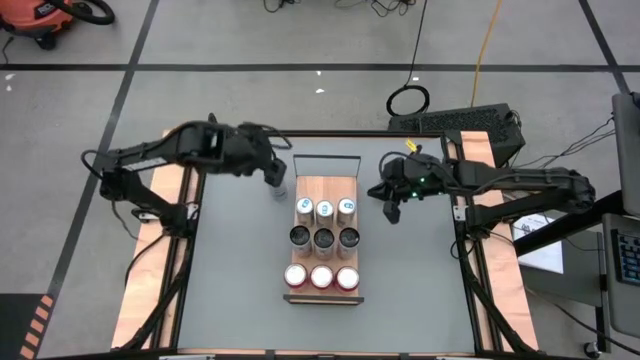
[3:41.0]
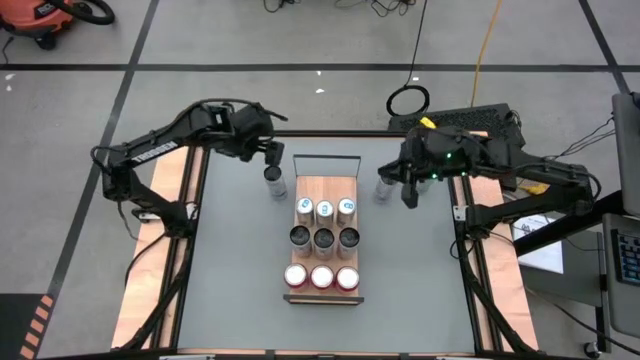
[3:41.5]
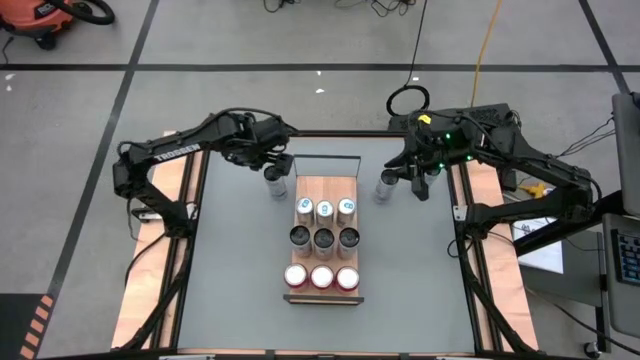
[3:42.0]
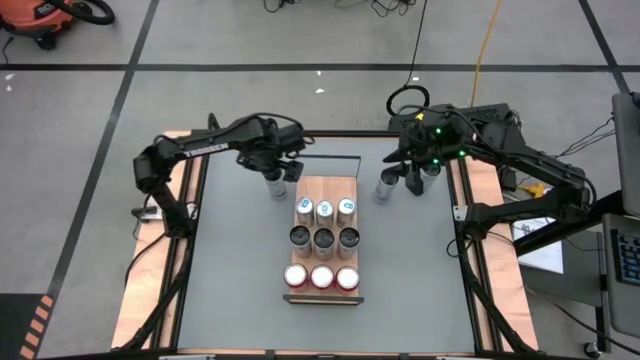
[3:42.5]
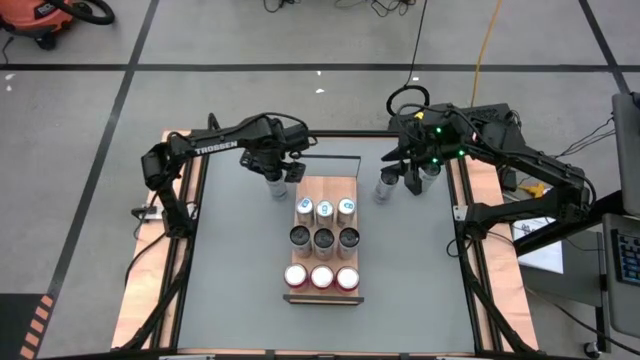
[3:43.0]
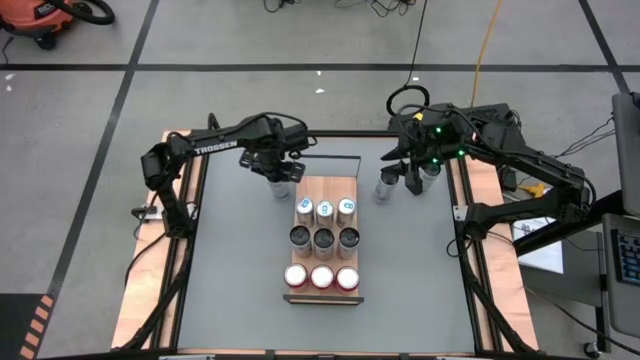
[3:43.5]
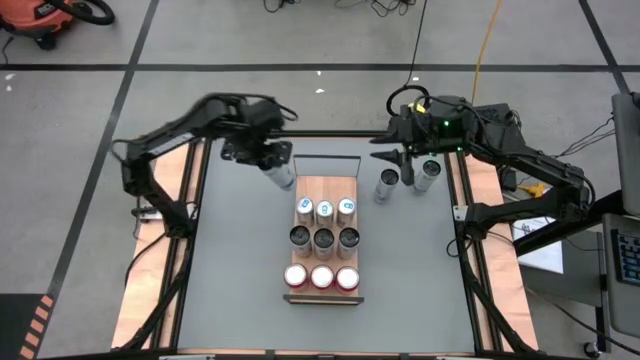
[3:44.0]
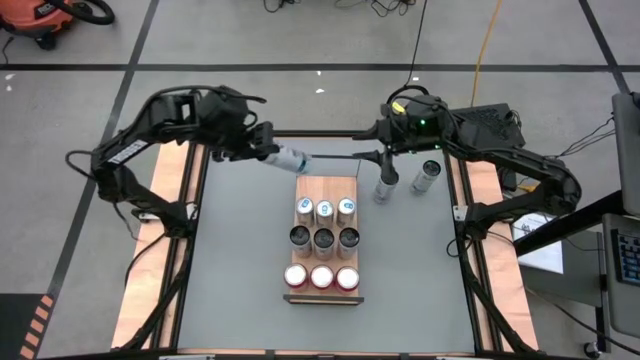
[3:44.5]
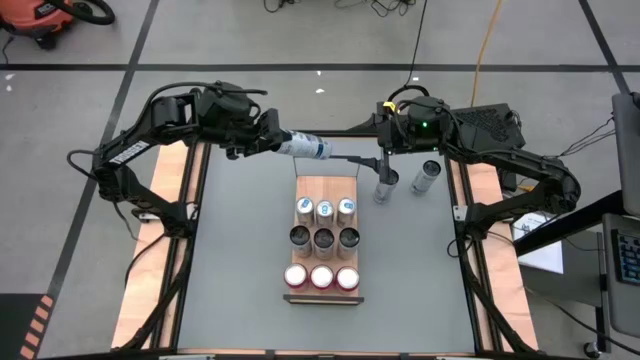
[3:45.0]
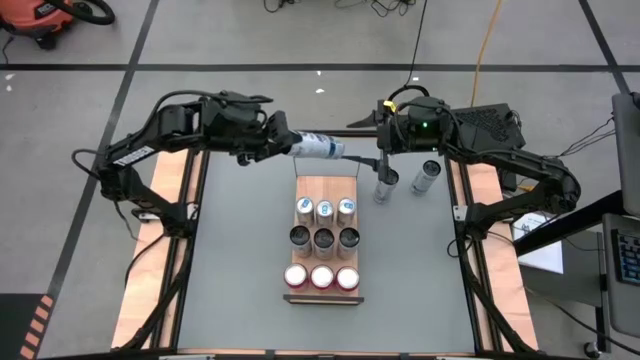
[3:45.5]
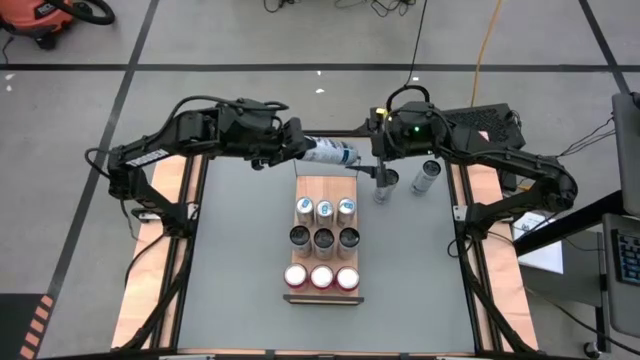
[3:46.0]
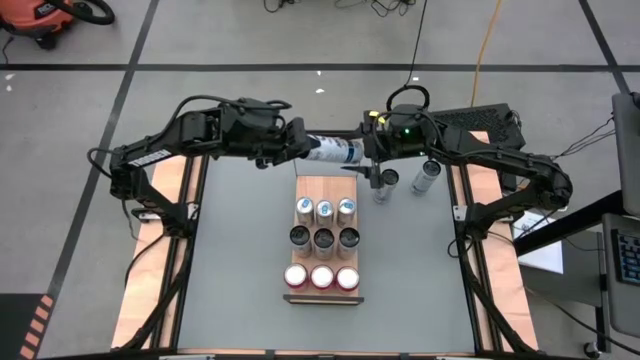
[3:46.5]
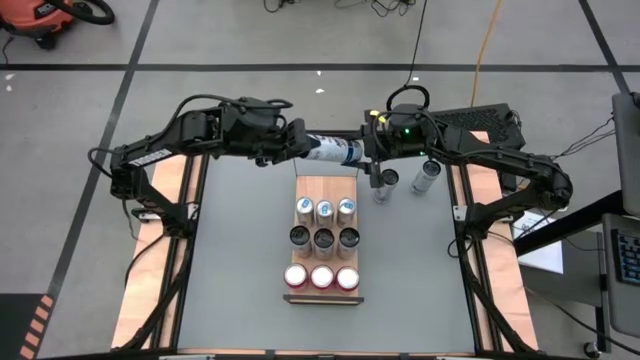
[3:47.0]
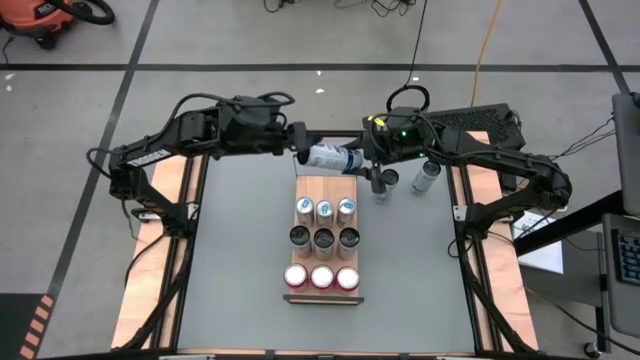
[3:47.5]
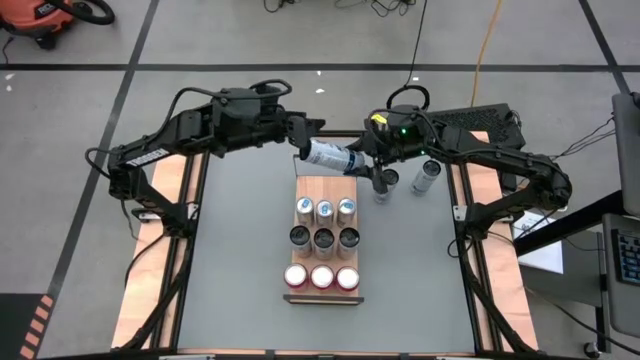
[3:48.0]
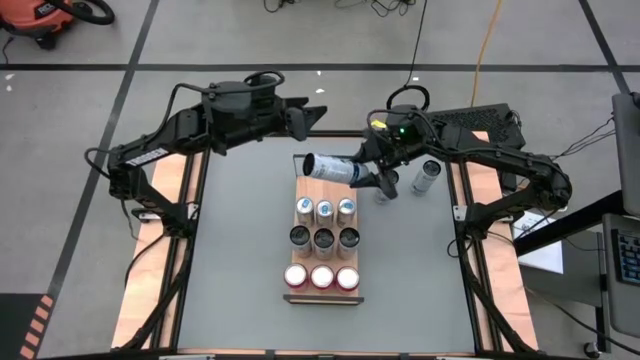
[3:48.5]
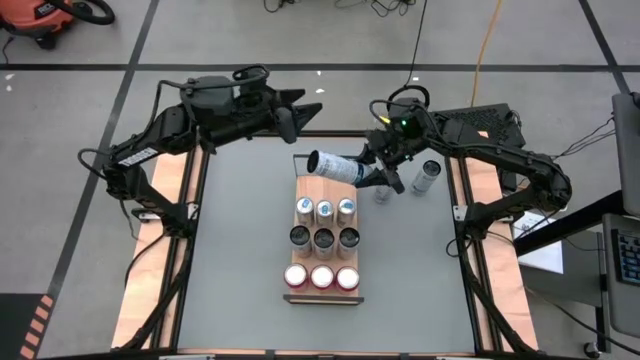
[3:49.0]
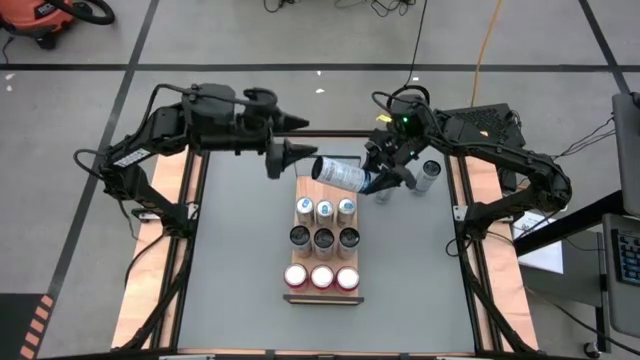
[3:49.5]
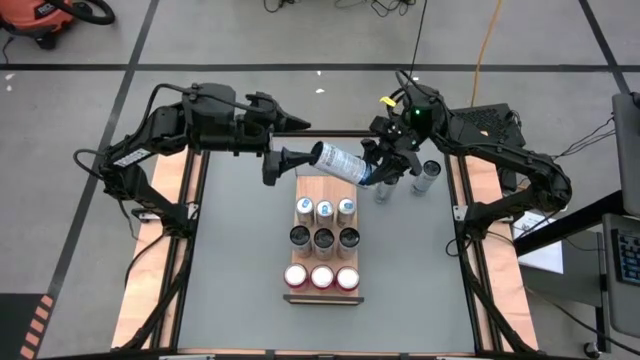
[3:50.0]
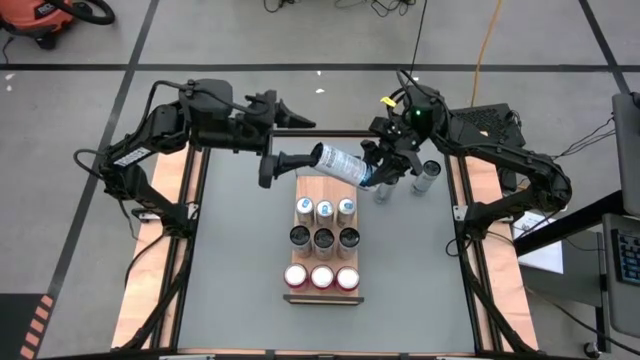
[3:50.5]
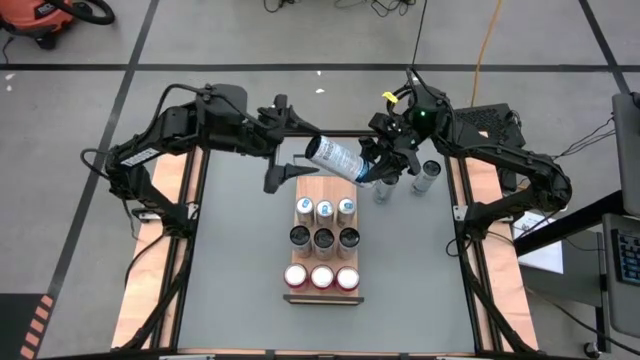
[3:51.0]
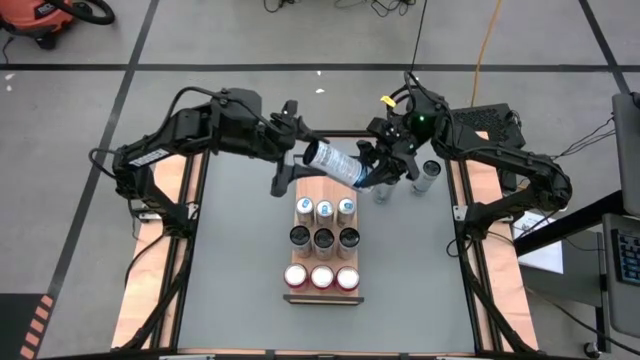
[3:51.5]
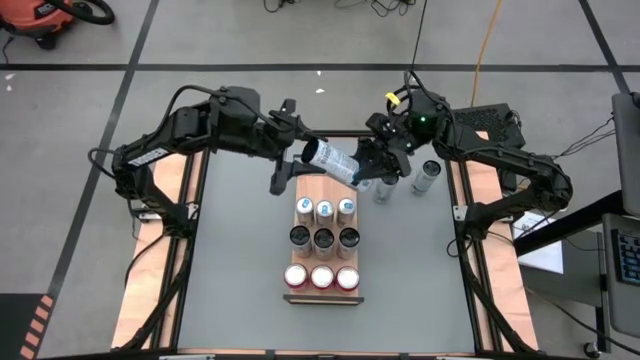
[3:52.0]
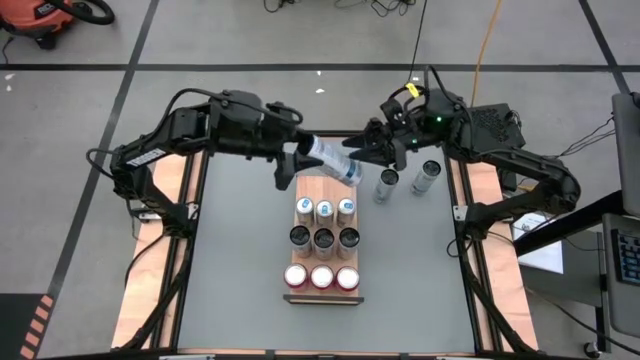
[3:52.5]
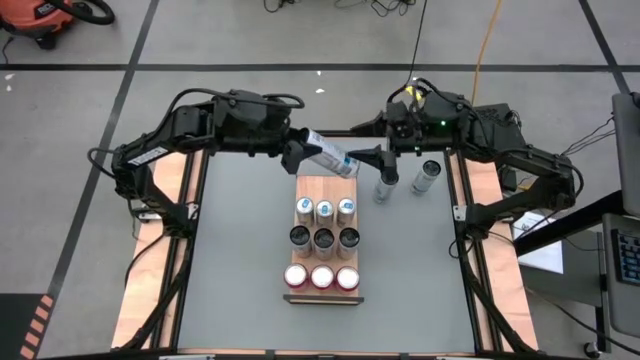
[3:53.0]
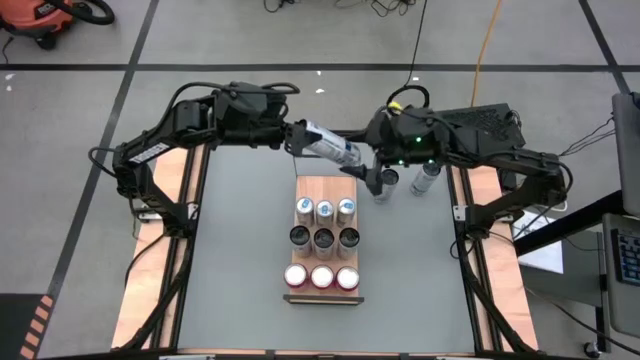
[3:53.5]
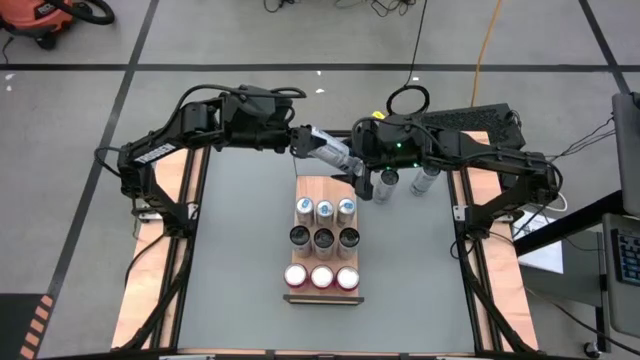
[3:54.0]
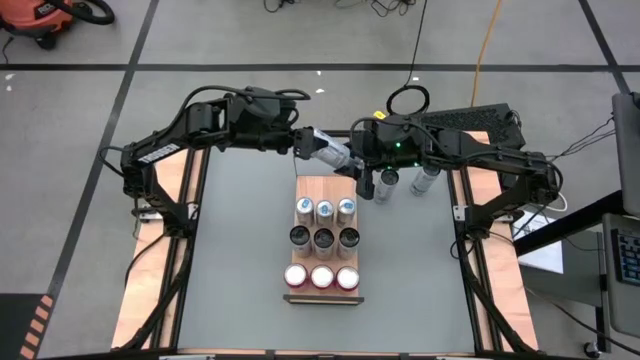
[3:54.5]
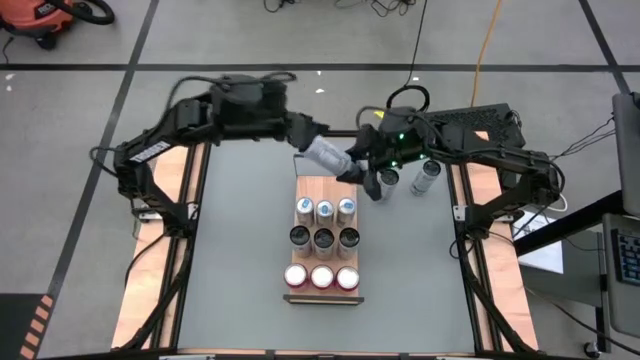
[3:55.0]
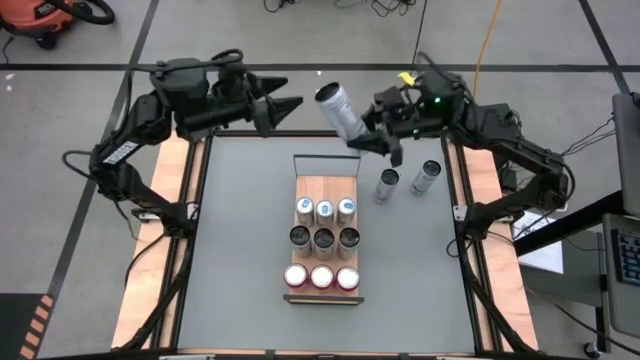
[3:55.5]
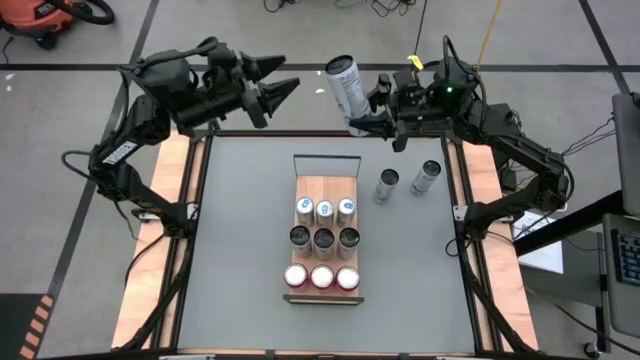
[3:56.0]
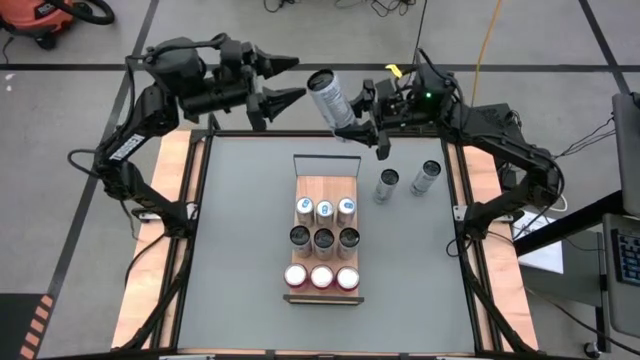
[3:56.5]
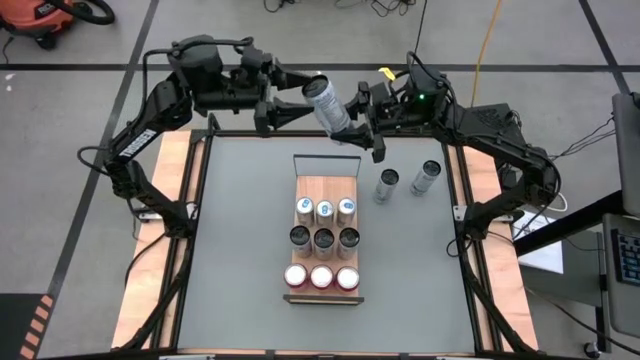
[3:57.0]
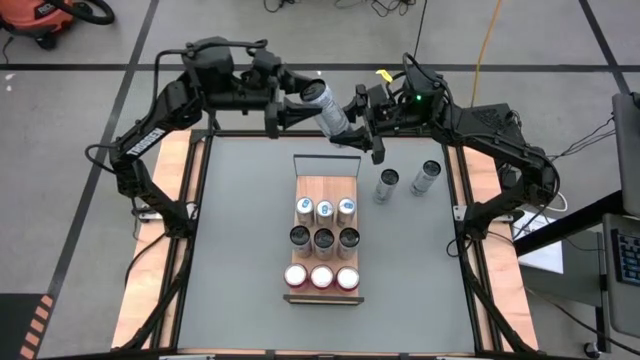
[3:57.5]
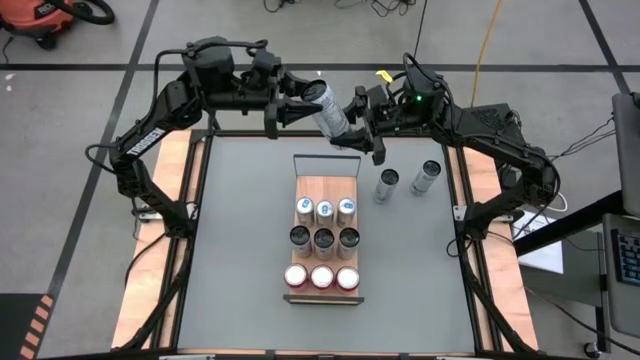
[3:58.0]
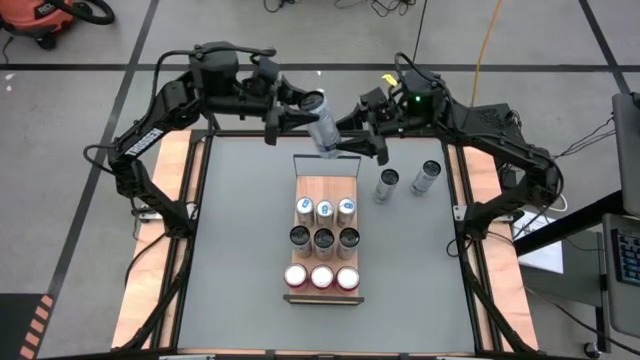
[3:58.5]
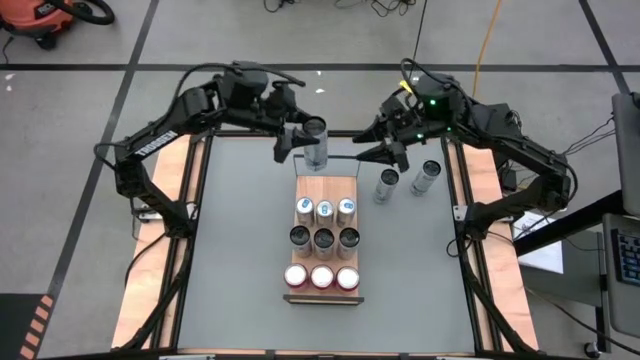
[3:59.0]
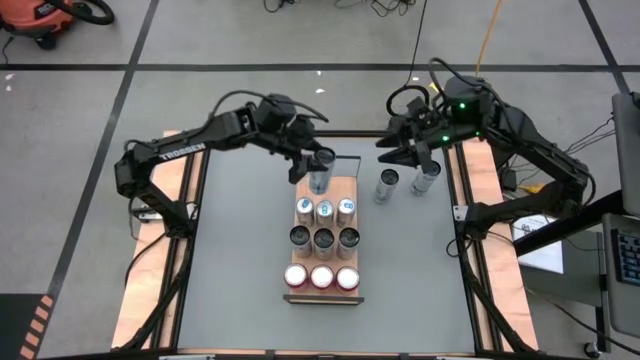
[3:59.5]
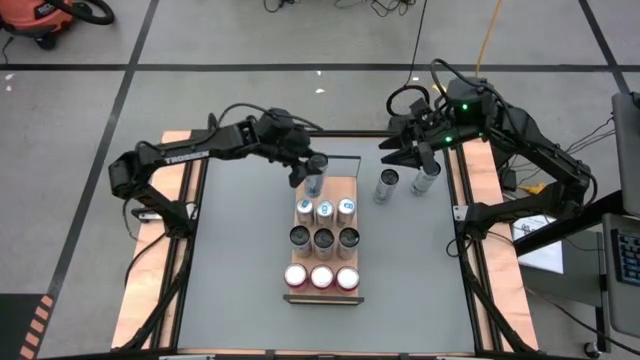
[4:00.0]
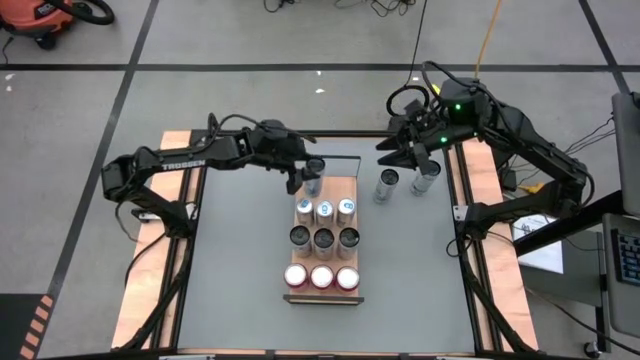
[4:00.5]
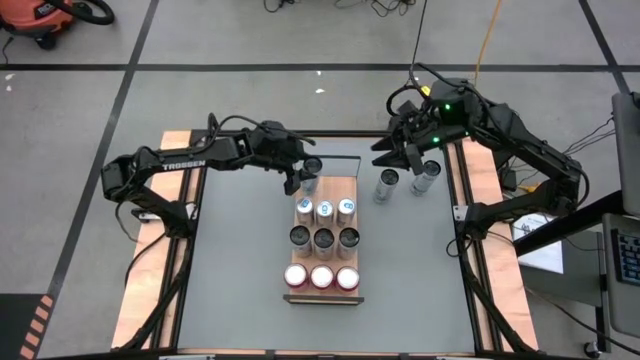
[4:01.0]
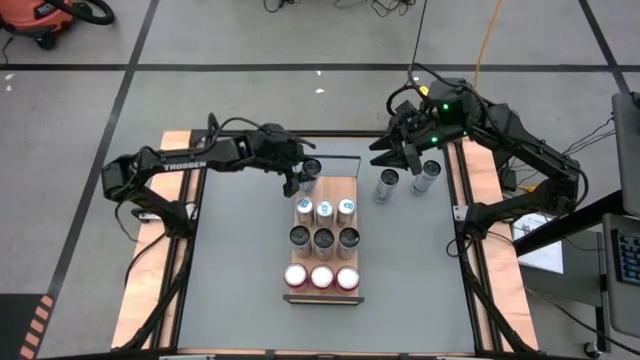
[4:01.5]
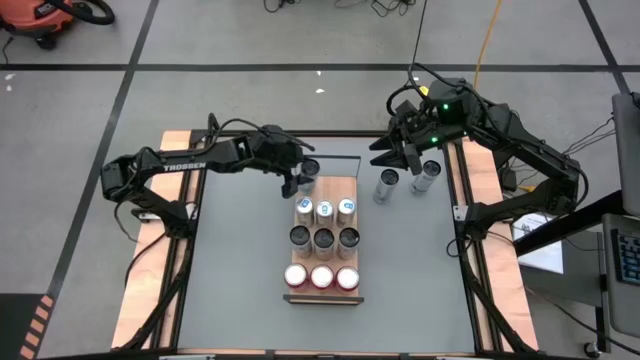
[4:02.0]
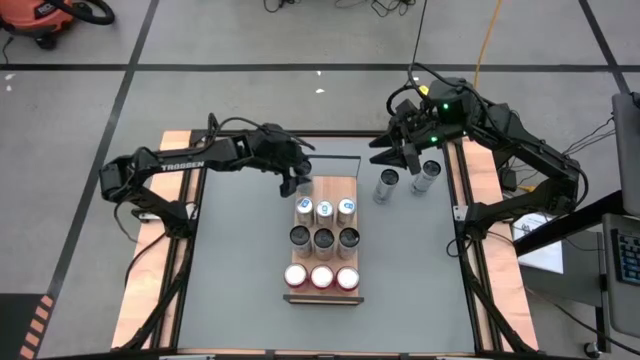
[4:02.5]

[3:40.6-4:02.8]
Task: Sort soda cans
Put the left white blue soda can on the shelf
